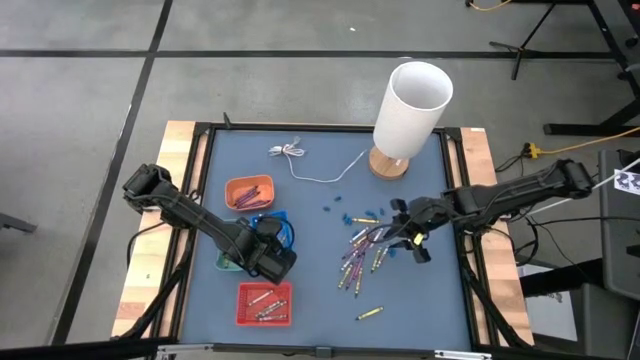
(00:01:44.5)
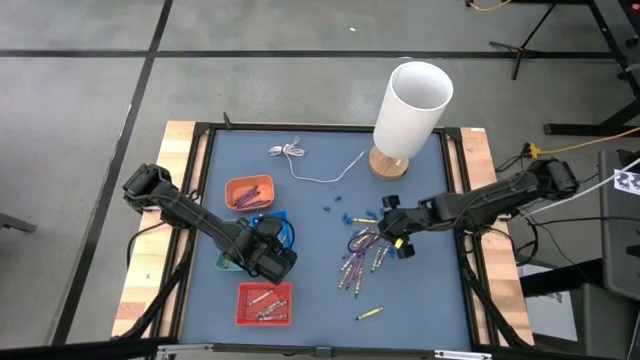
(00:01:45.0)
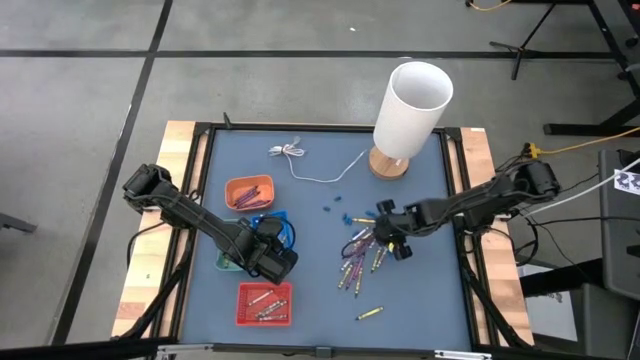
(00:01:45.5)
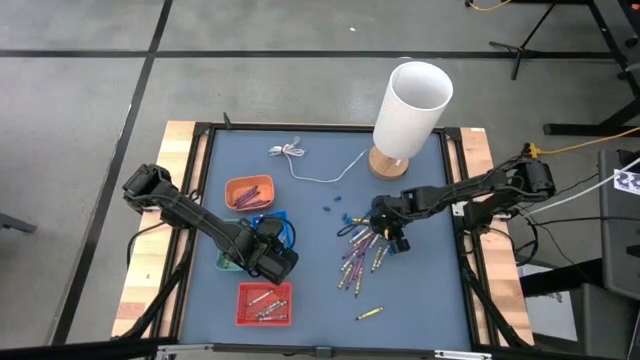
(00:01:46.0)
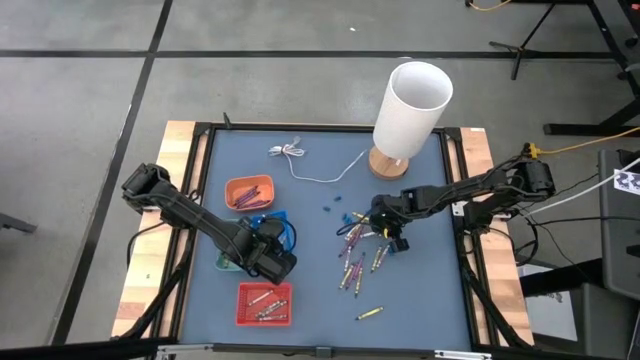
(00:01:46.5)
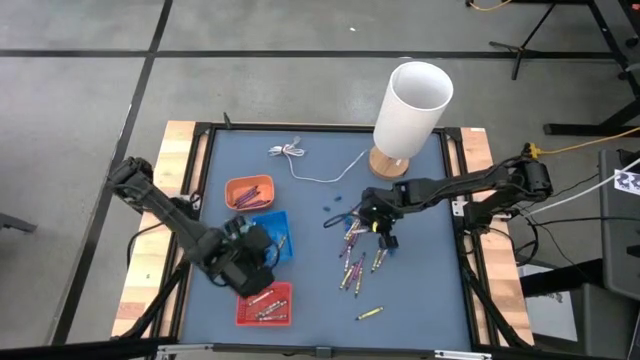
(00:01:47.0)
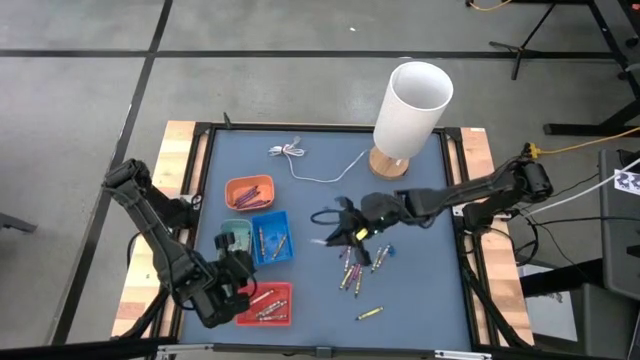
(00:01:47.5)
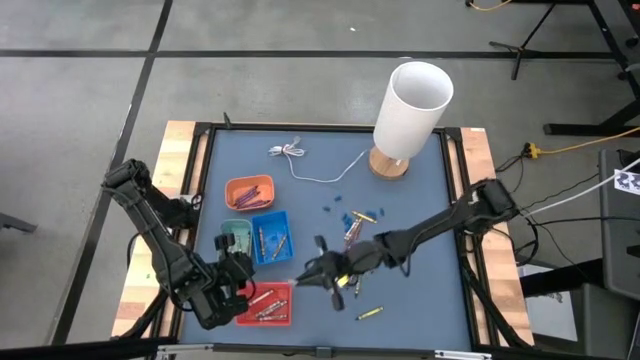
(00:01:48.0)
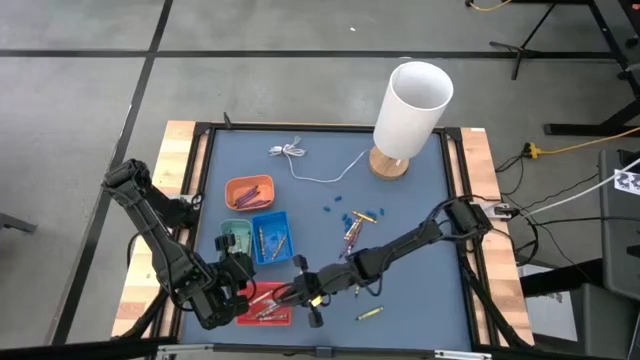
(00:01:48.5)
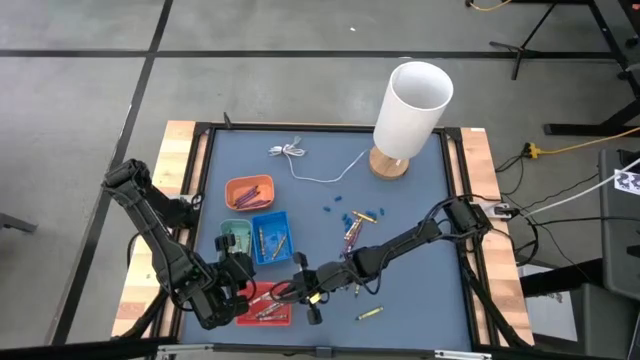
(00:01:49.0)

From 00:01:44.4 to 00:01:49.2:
Task: Sort crayons
Put the gray crayon into the orange basket

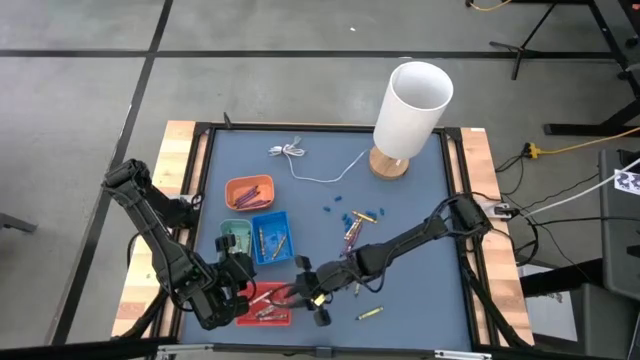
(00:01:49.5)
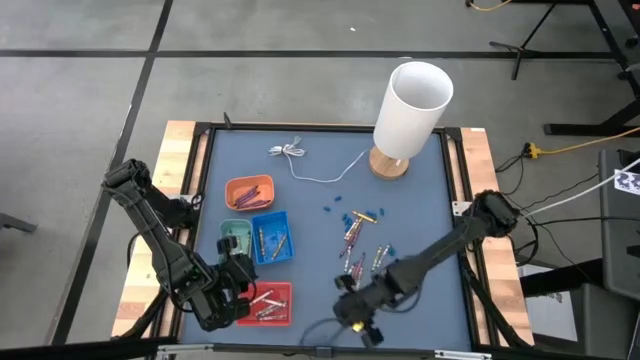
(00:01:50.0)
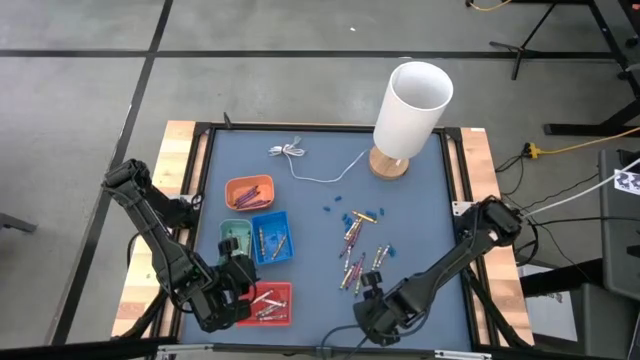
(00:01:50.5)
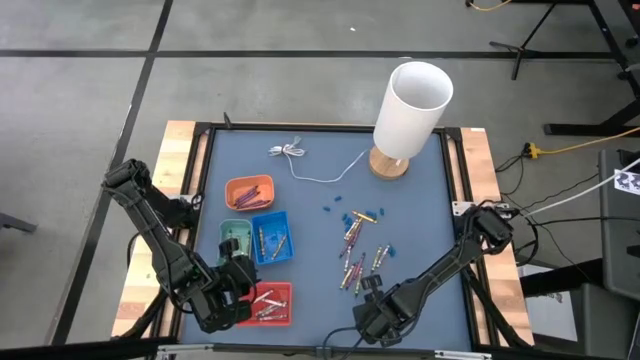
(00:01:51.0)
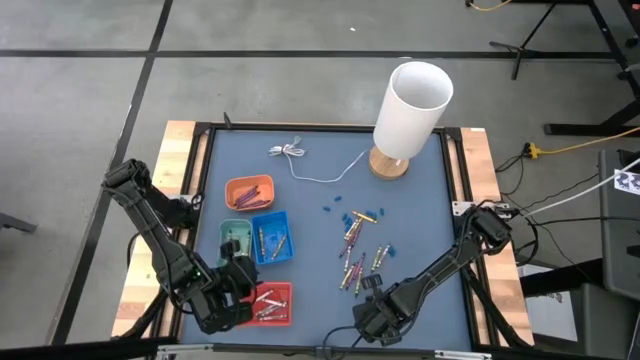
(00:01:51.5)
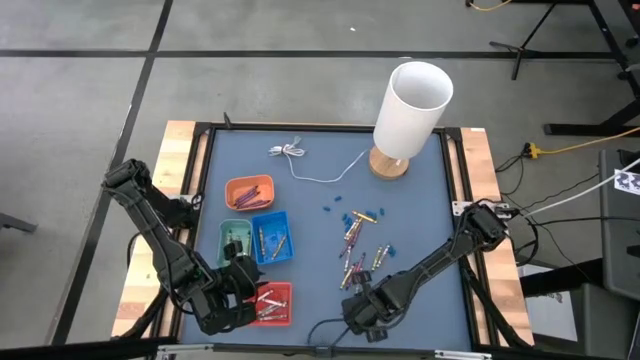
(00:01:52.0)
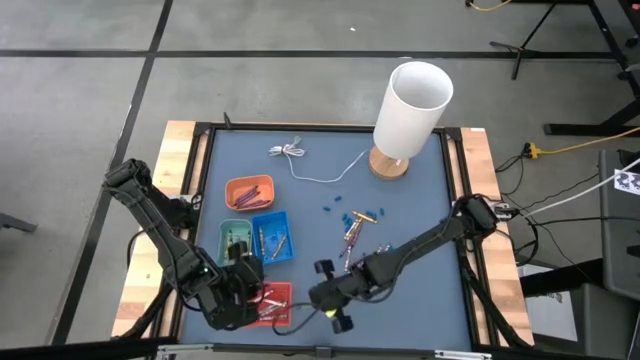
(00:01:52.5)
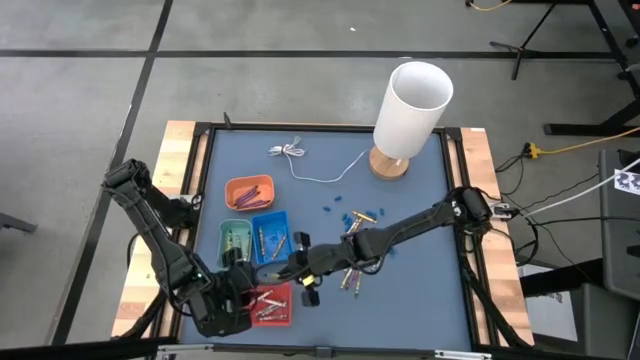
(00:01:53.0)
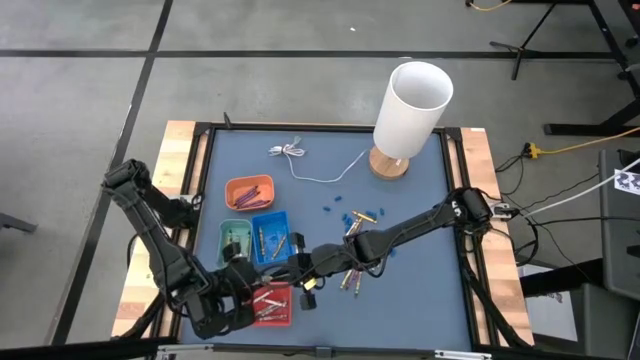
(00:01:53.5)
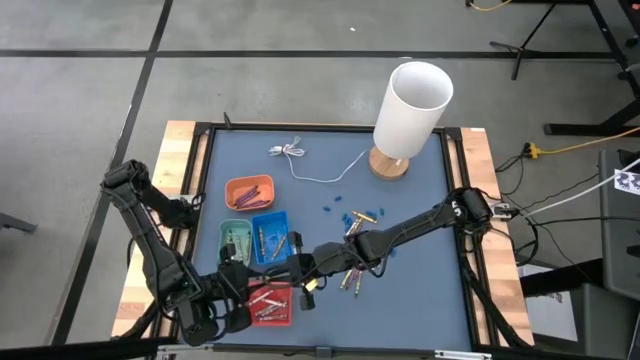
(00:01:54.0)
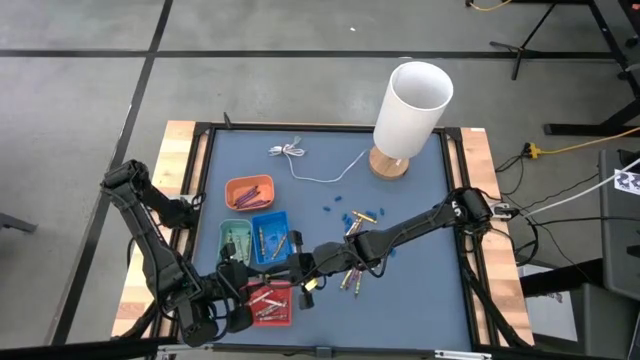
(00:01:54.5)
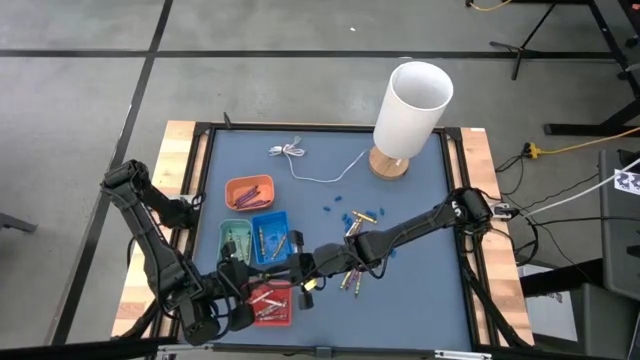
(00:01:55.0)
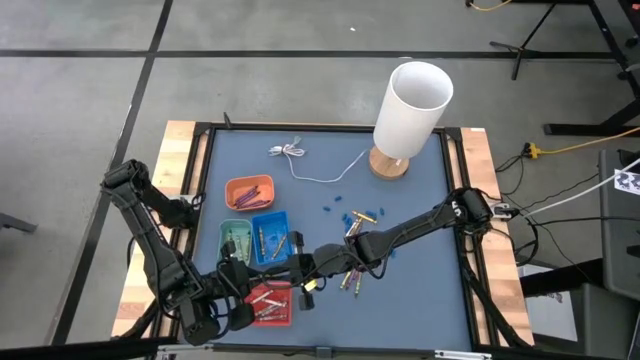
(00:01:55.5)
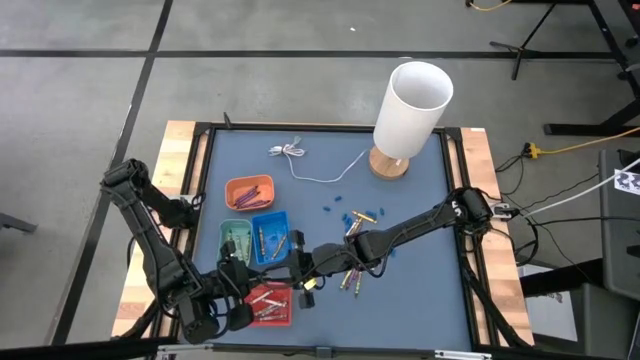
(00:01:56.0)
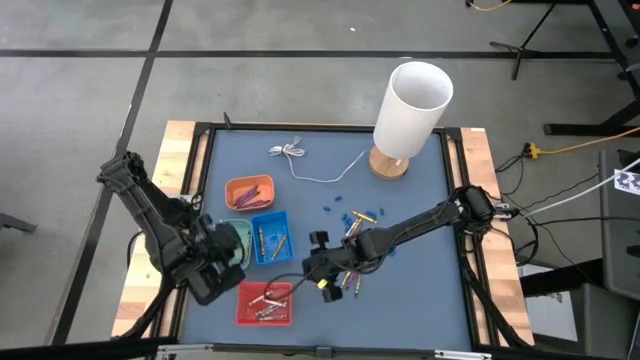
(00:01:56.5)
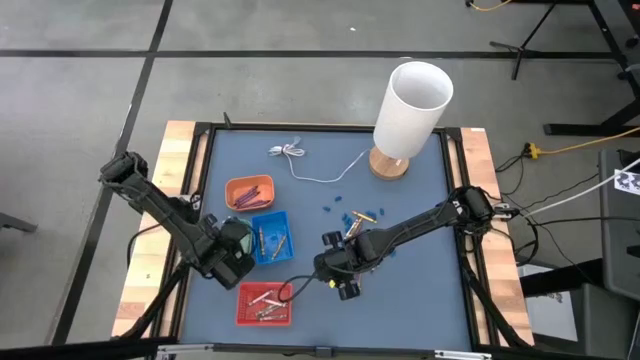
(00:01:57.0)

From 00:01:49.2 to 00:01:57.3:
Put the green crayon into the green bin

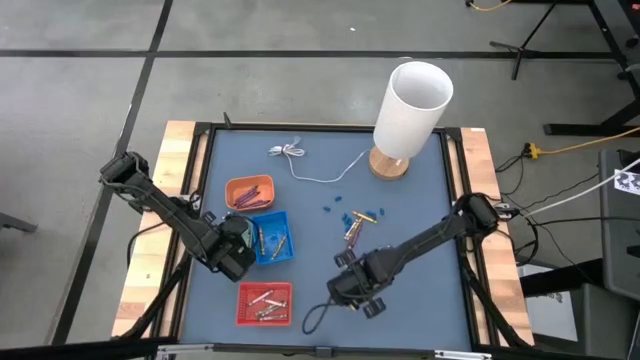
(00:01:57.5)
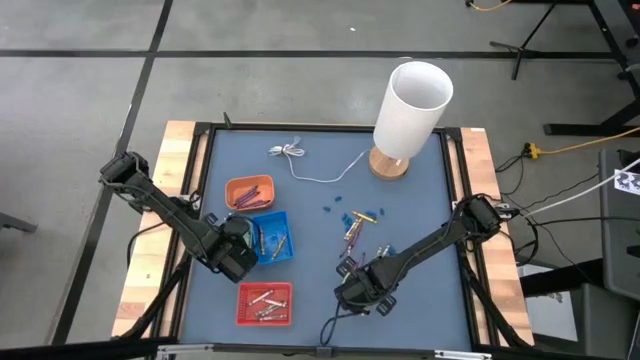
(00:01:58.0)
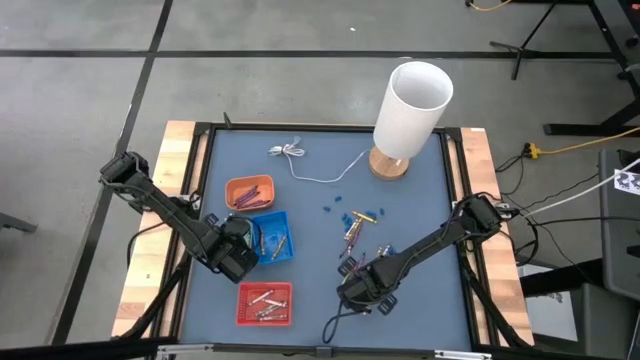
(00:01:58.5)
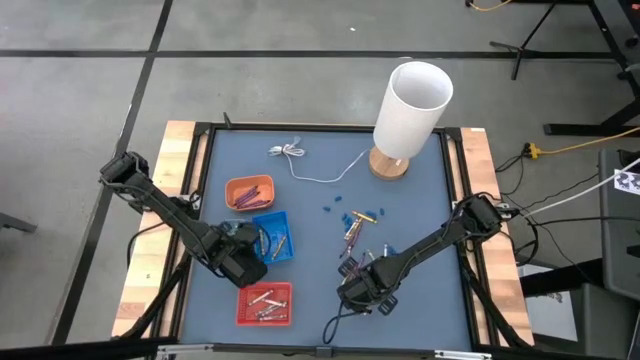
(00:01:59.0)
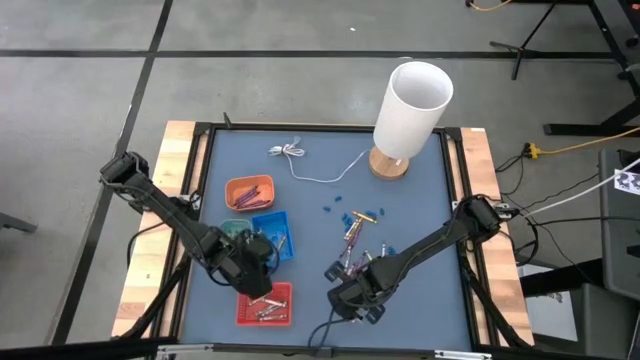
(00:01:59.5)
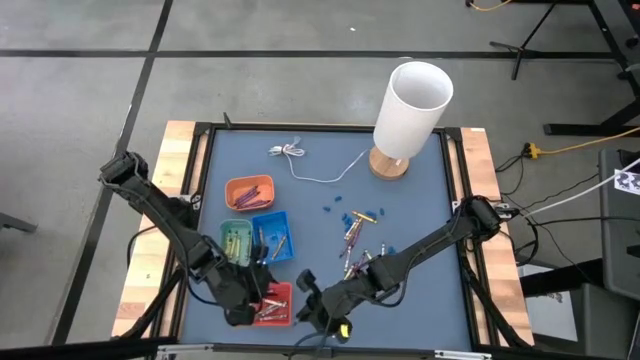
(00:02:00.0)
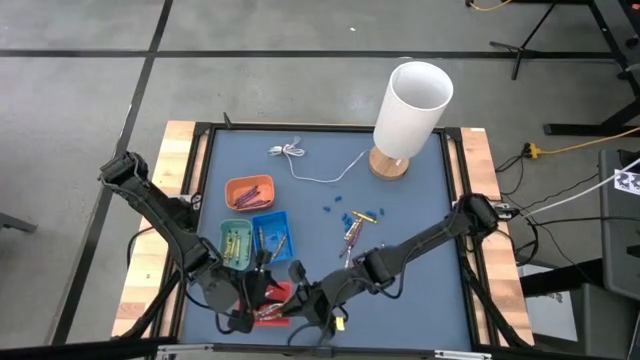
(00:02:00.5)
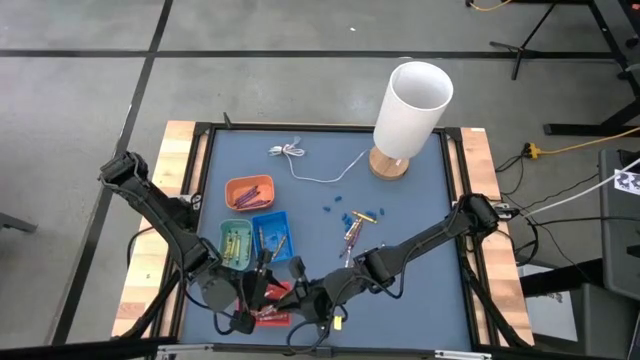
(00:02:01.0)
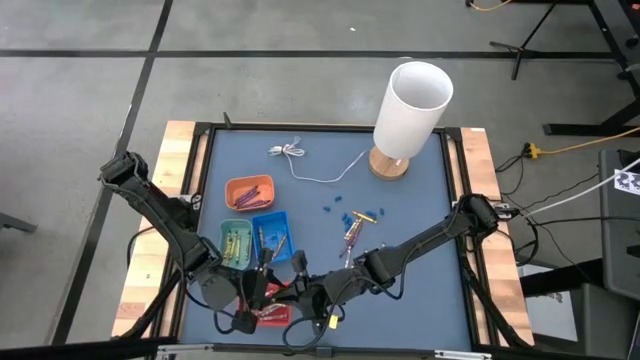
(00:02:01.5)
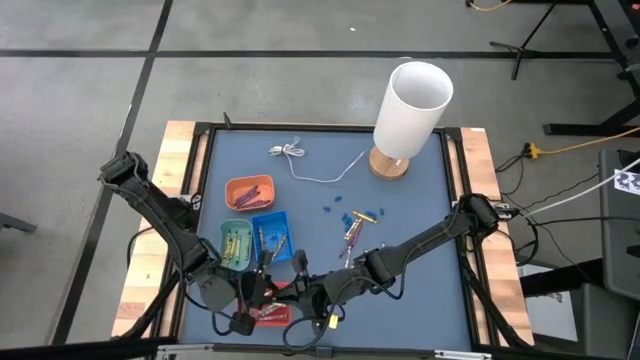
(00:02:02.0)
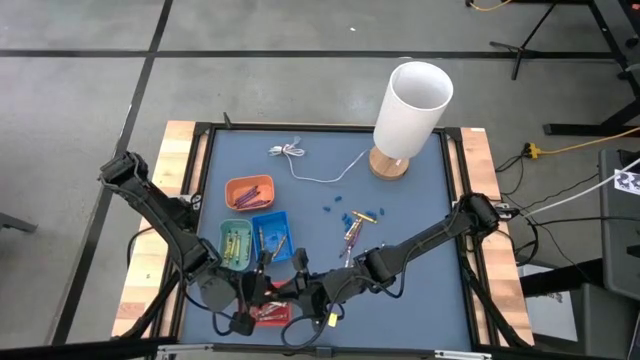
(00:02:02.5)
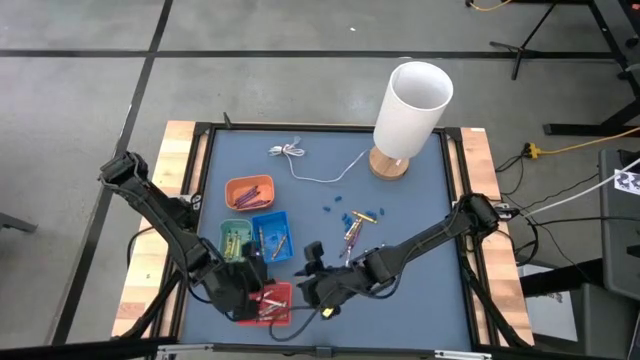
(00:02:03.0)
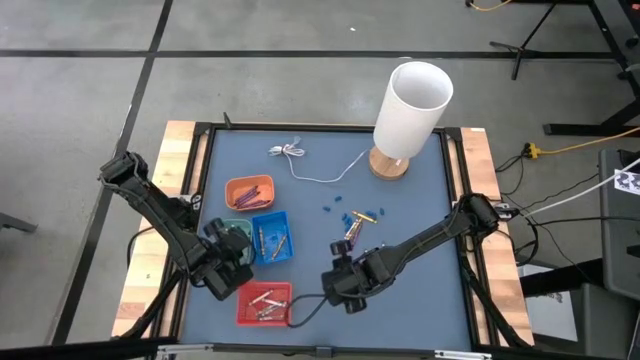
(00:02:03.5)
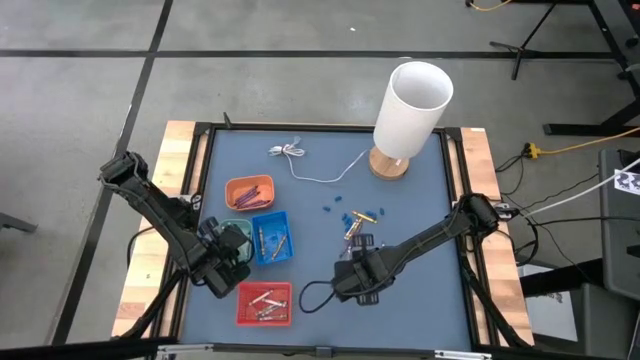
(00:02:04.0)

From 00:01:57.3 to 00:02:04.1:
Put the green crayon into the blue green bin
